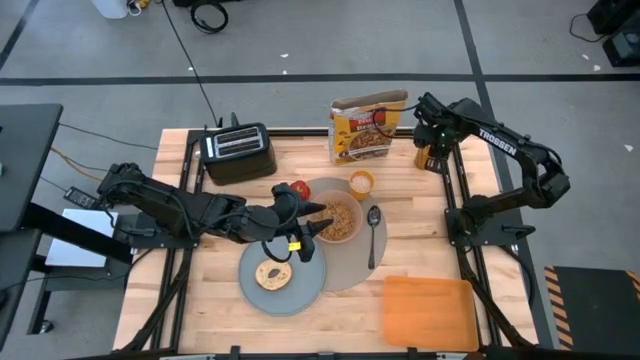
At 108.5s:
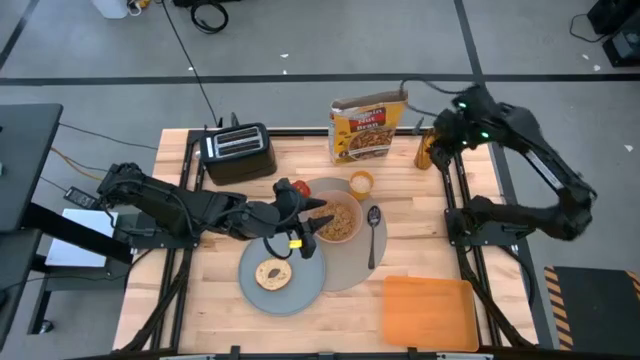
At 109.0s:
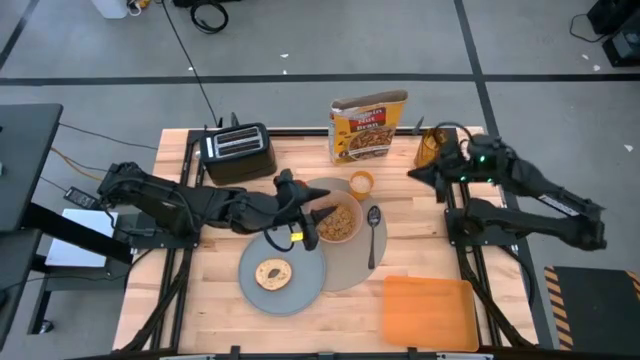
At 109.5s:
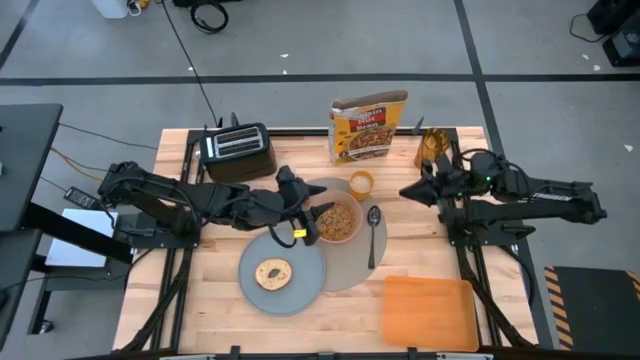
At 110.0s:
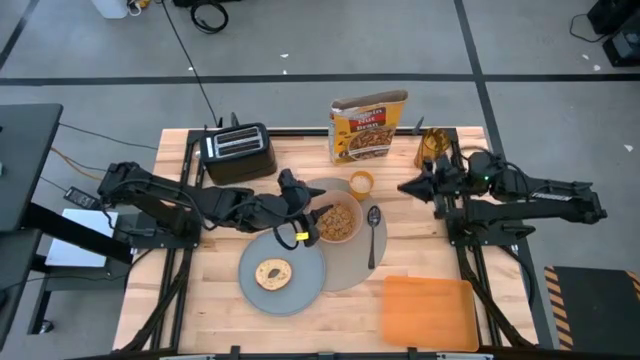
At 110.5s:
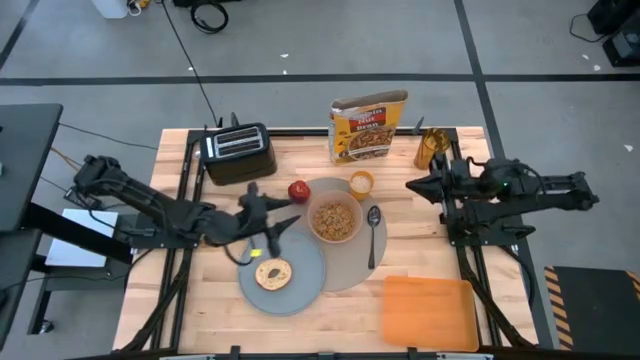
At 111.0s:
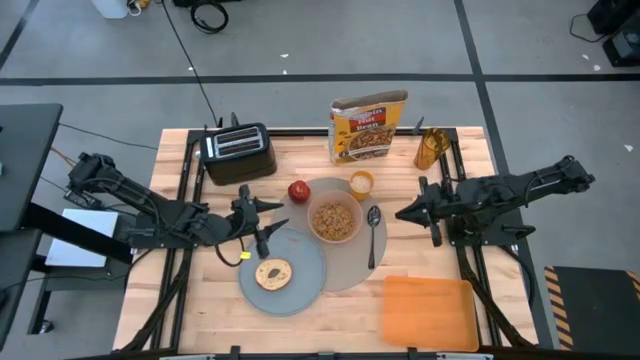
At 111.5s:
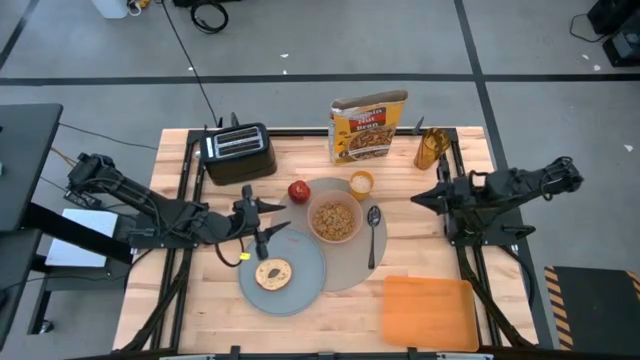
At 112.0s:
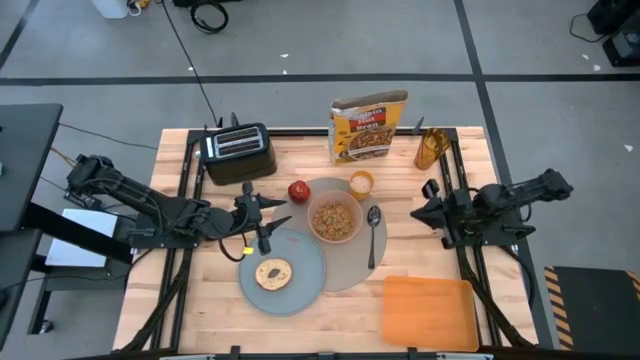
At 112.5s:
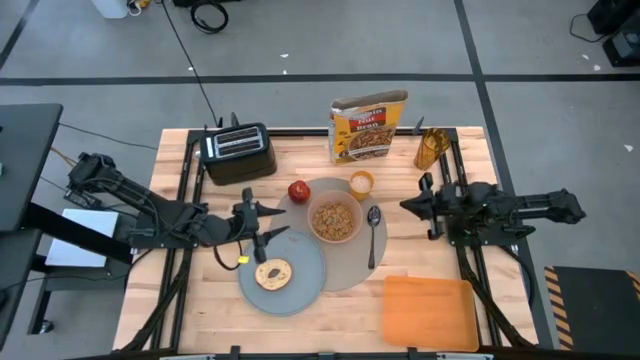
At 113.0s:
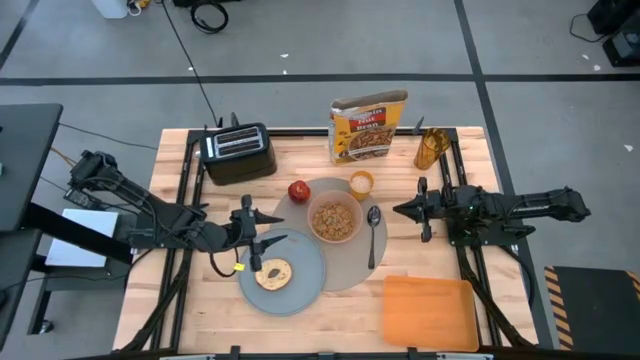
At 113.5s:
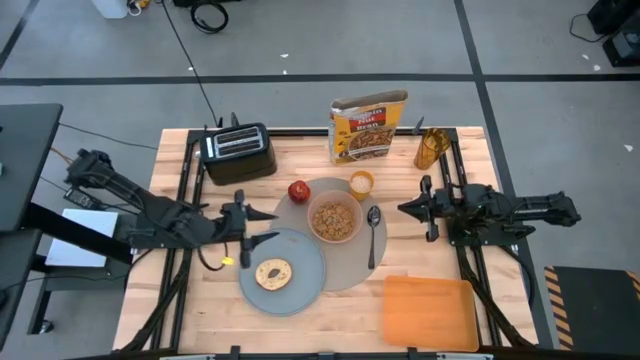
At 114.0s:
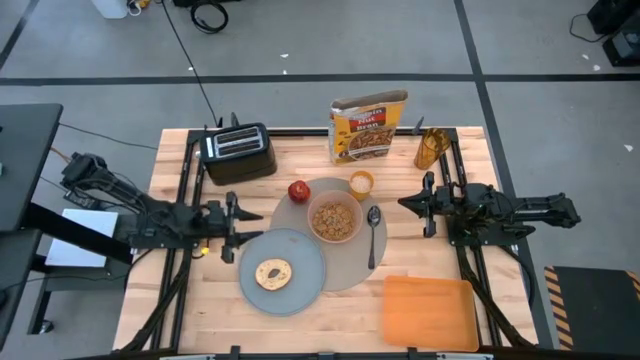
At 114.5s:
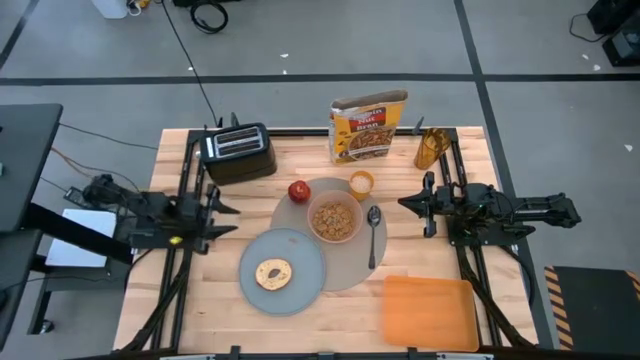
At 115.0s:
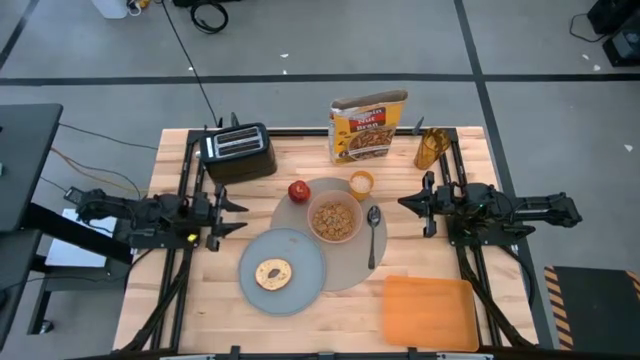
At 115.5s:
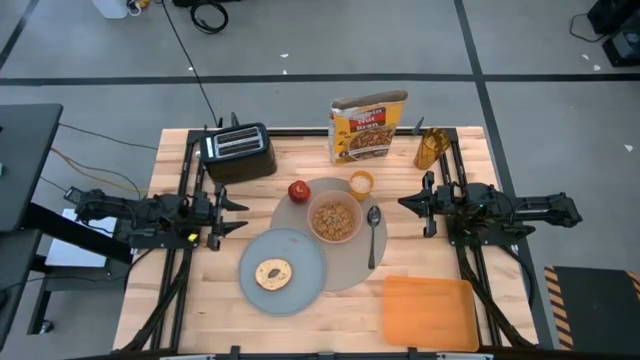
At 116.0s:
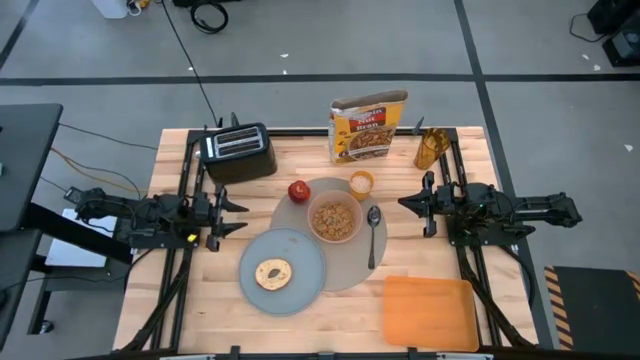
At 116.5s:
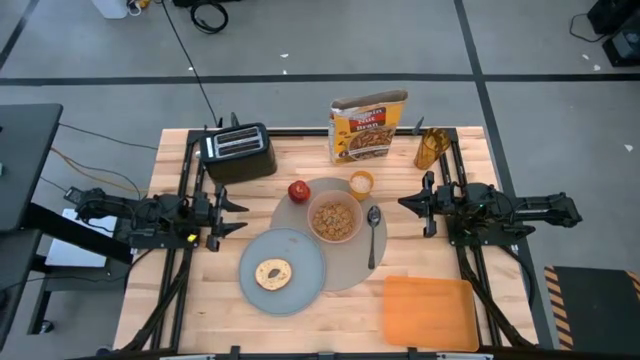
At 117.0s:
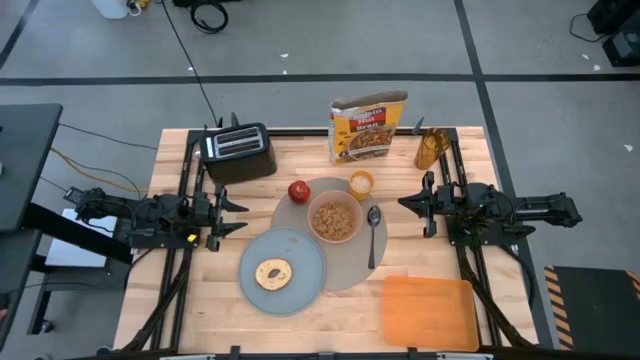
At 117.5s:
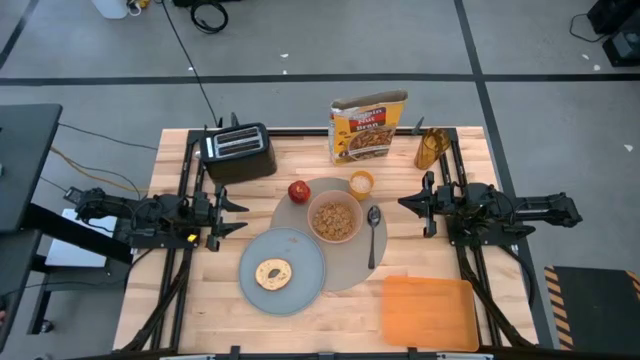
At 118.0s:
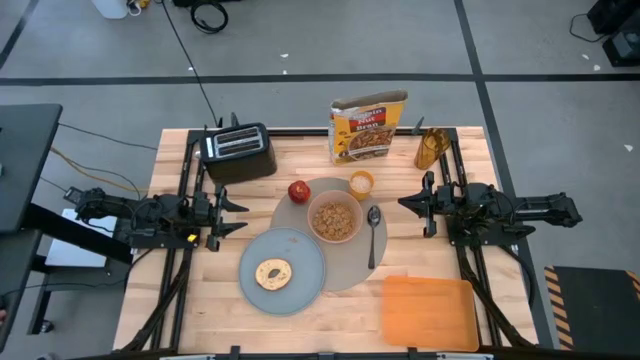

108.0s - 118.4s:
Task: Arrange a breakfast setting
Return to Home Position

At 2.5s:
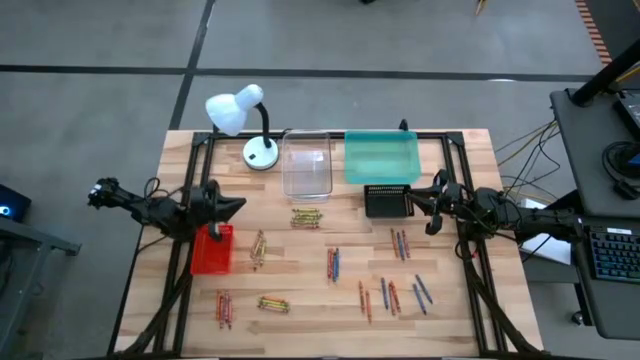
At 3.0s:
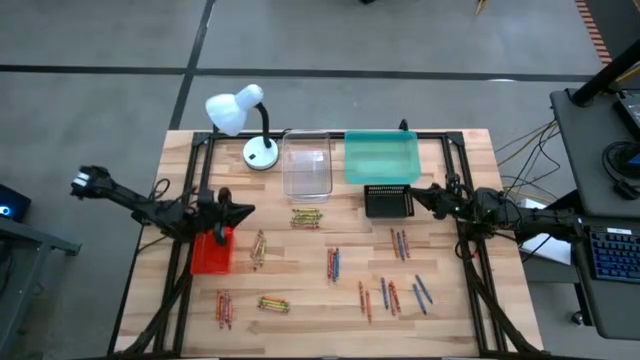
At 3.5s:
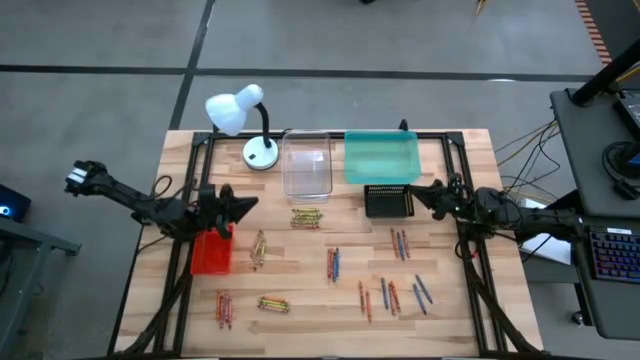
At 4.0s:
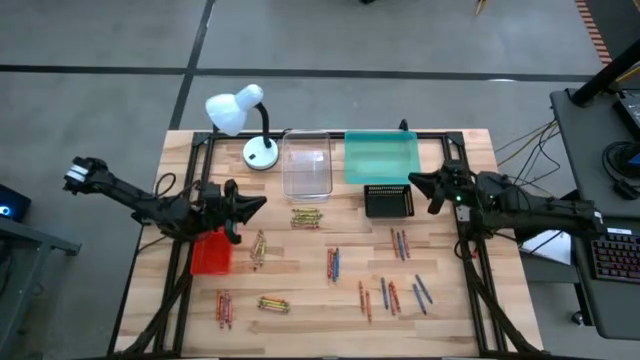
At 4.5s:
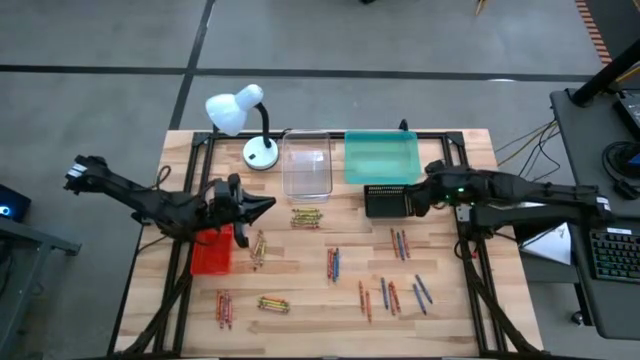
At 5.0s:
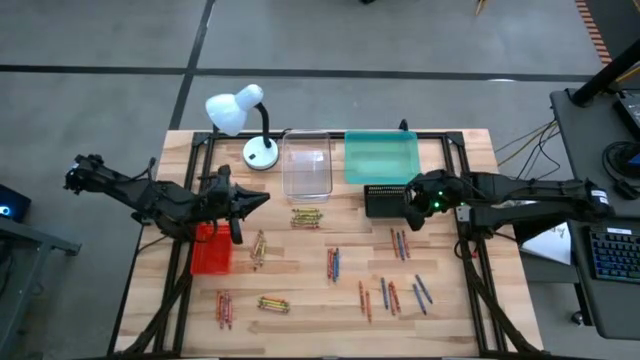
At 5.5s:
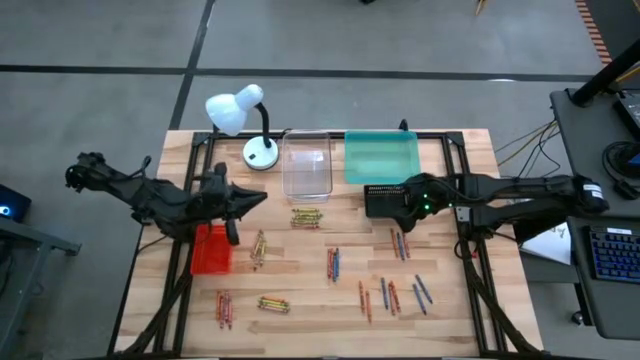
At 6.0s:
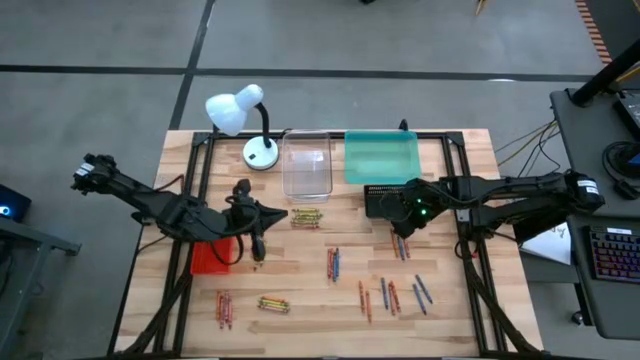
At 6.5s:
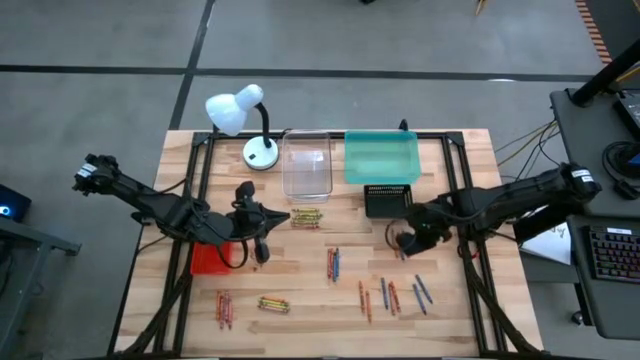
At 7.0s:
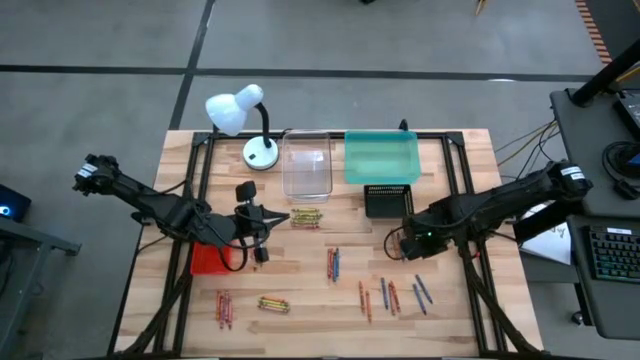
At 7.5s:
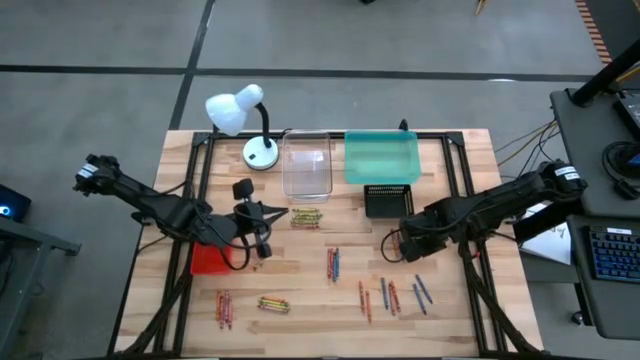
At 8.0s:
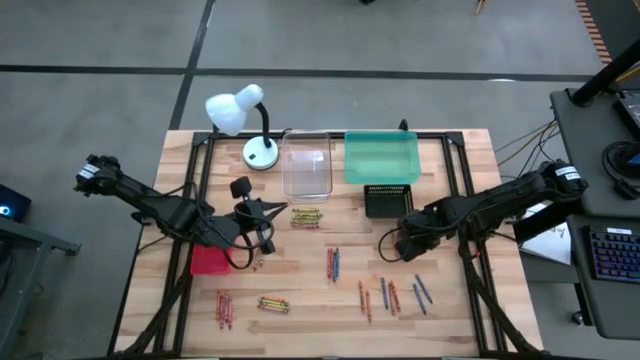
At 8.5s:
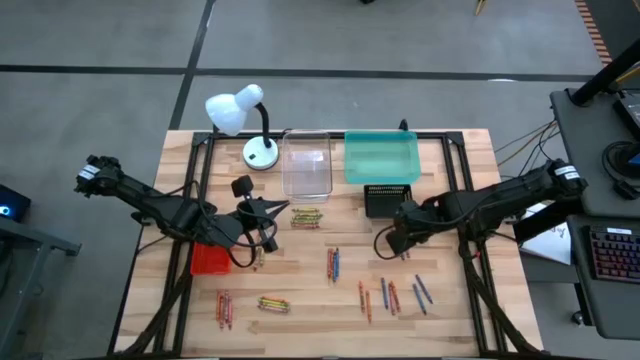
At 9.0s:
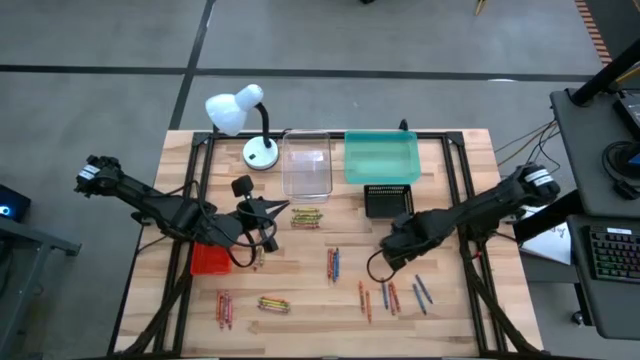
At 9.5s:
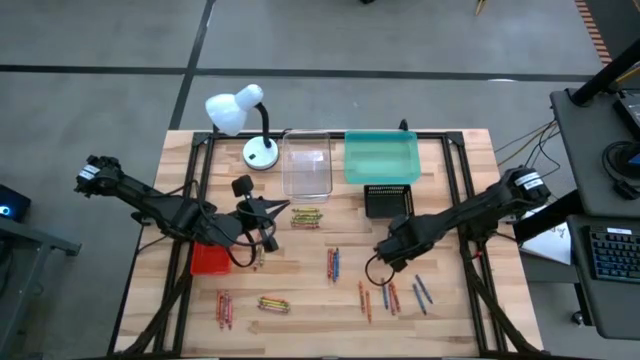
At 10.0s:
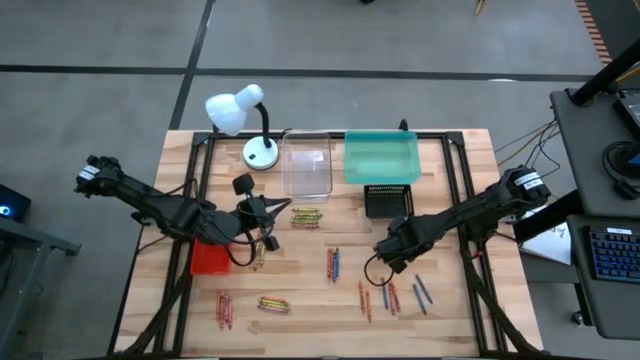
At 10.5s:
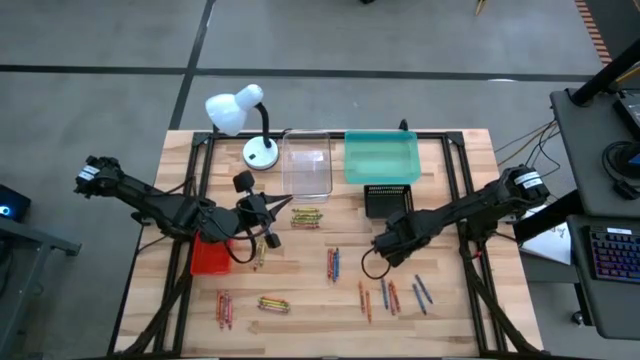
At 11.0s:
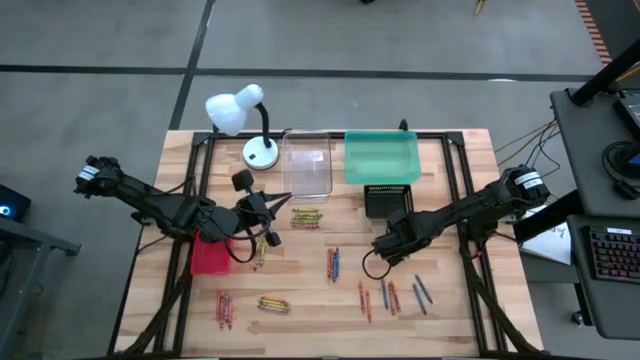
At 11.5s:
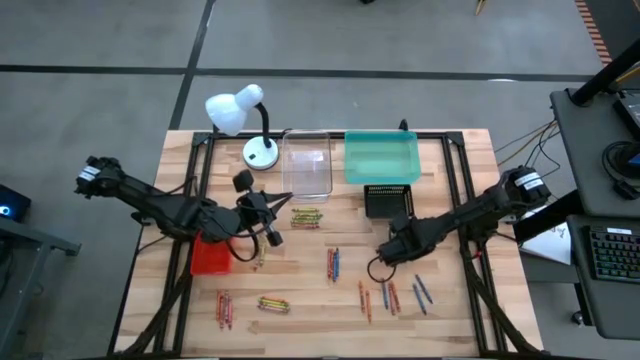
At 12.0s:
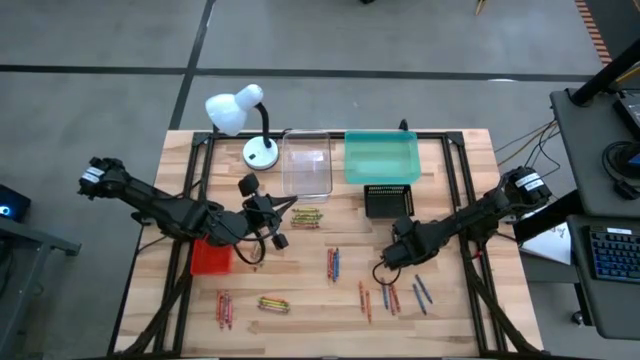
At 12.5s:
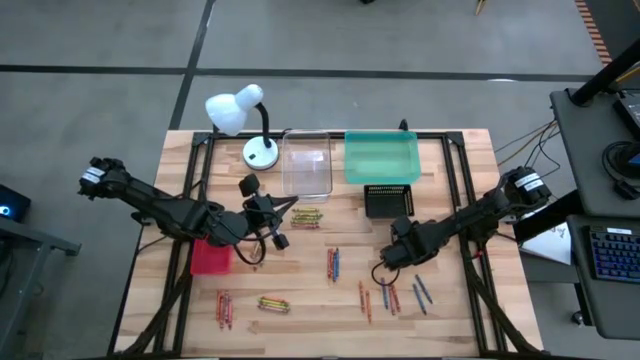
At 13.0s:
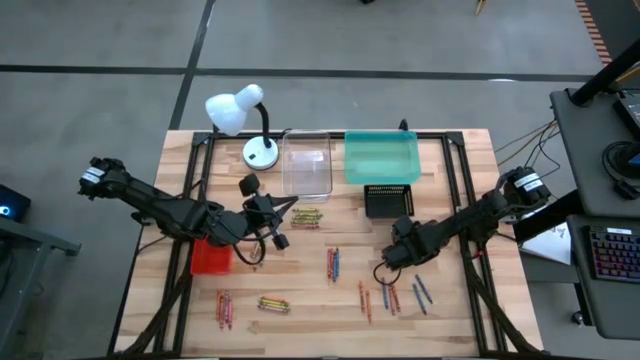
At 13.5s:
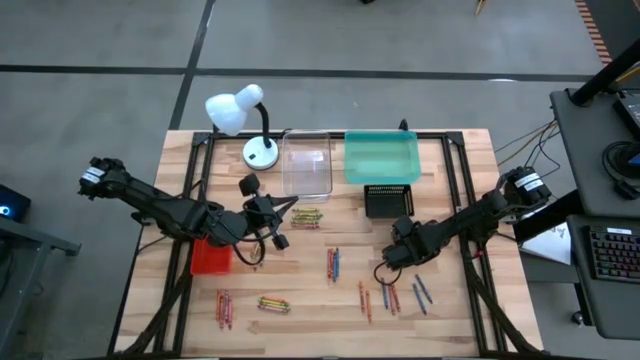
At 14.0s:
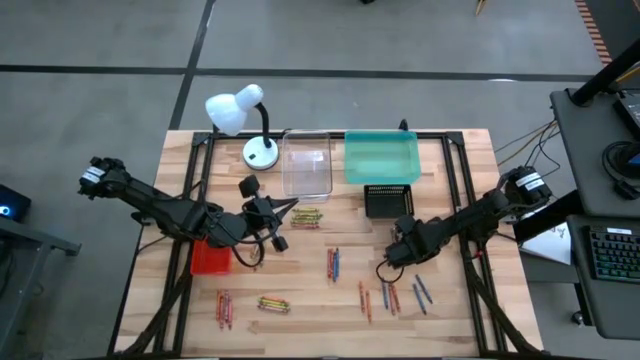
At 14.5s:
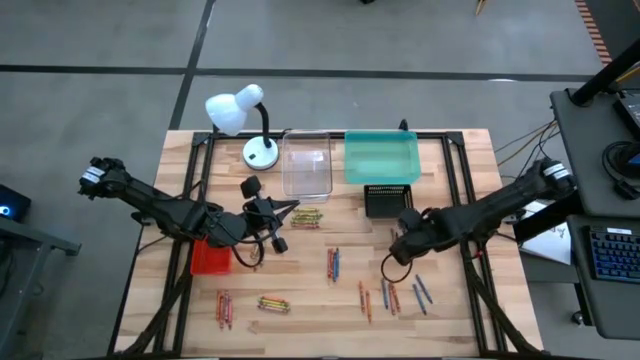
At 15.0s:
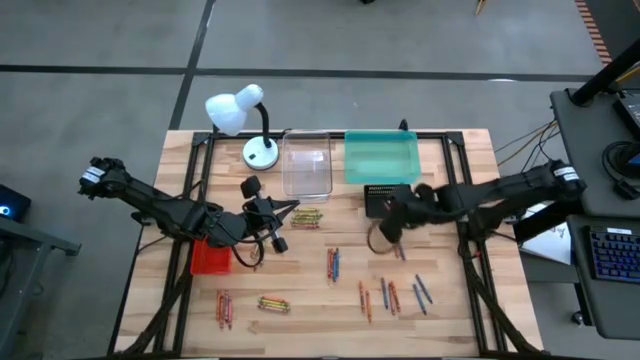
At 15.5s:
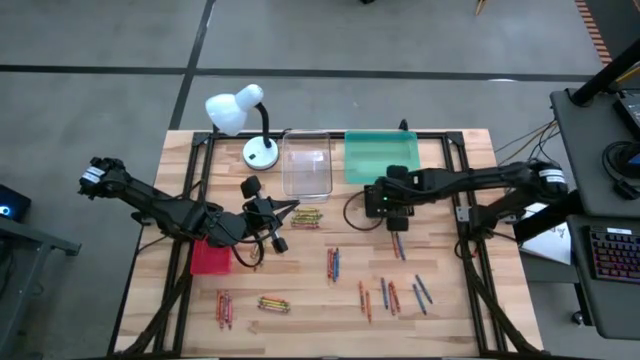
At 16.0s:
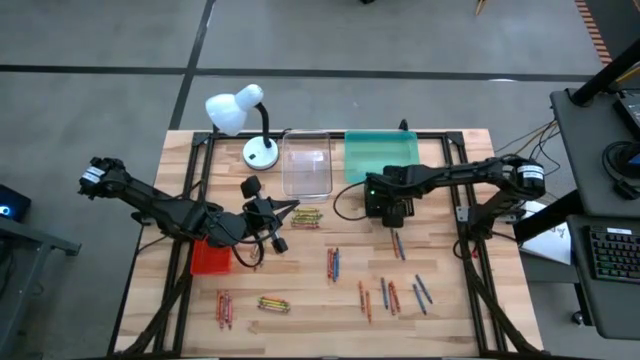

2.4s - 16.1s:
Task: Sort crayons
Put the red crayon into the black bin
